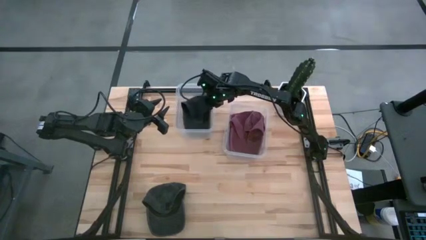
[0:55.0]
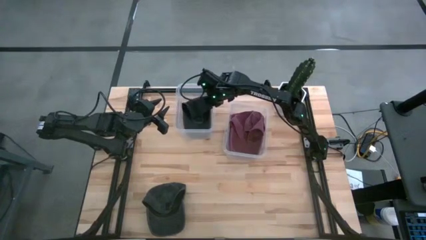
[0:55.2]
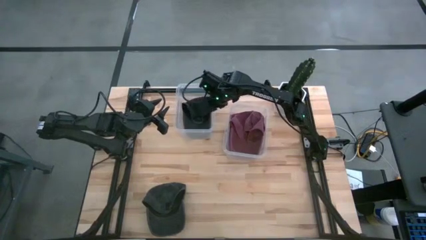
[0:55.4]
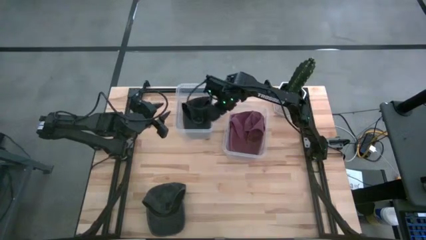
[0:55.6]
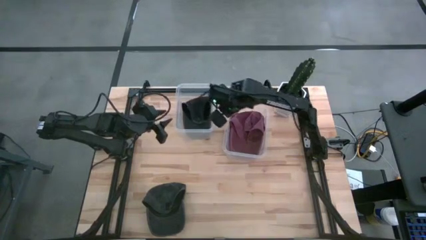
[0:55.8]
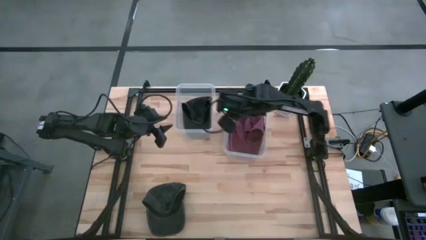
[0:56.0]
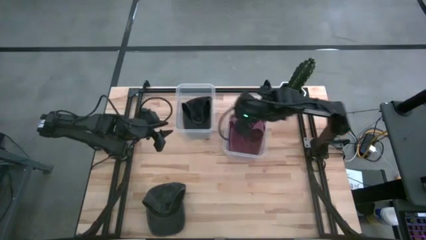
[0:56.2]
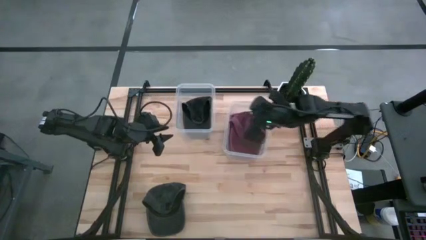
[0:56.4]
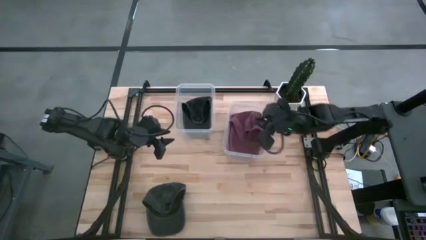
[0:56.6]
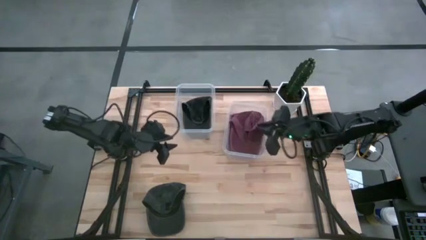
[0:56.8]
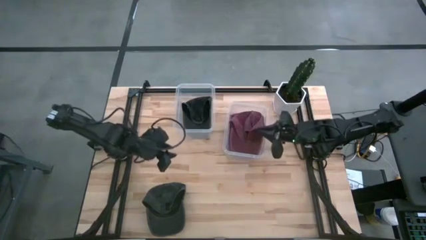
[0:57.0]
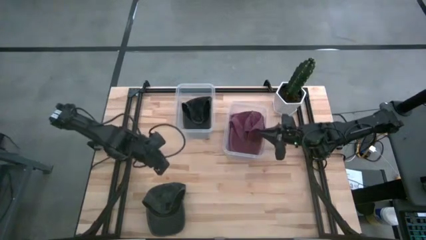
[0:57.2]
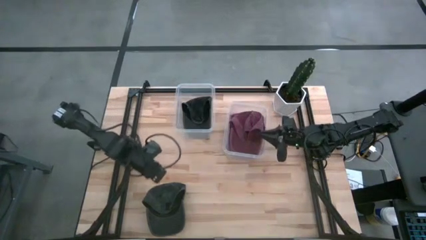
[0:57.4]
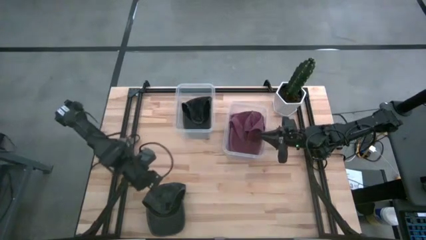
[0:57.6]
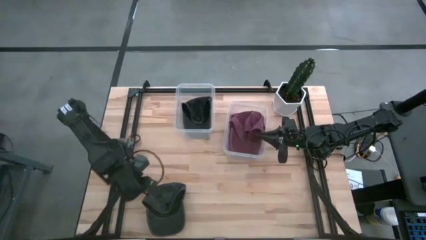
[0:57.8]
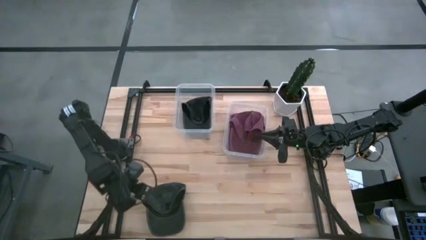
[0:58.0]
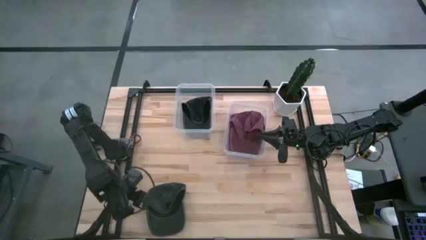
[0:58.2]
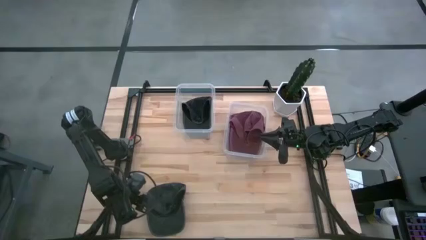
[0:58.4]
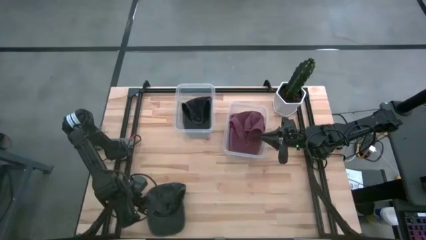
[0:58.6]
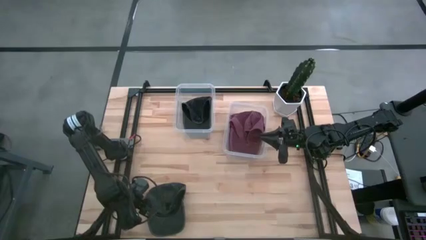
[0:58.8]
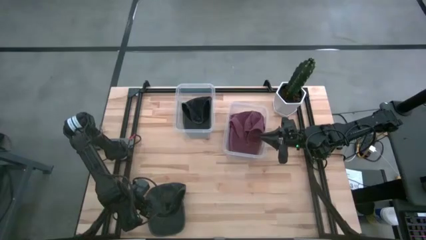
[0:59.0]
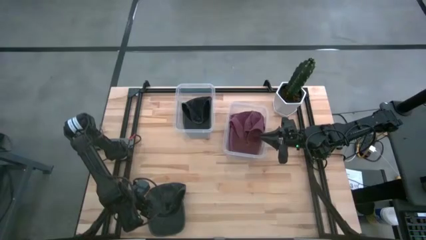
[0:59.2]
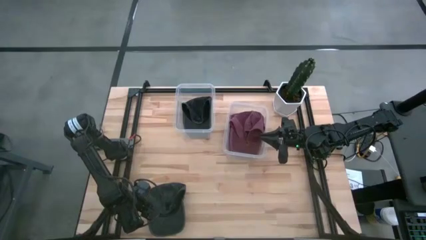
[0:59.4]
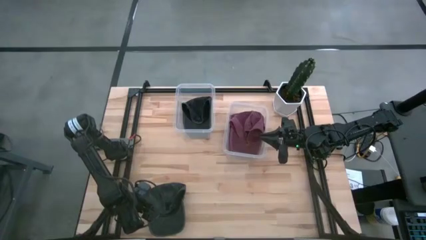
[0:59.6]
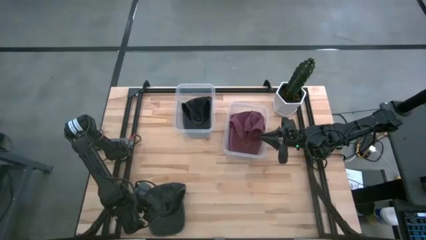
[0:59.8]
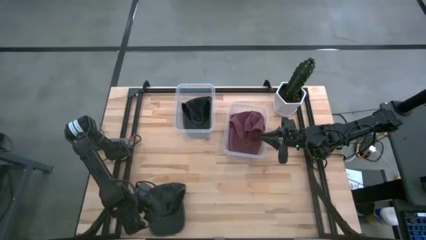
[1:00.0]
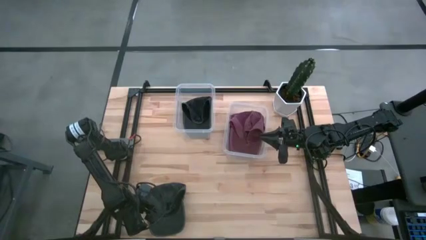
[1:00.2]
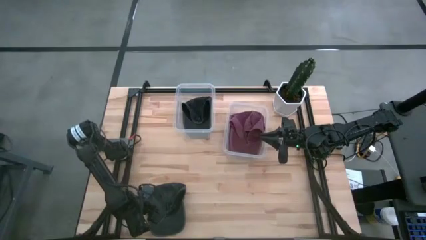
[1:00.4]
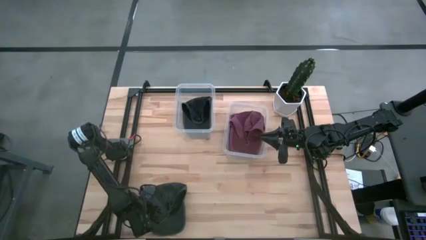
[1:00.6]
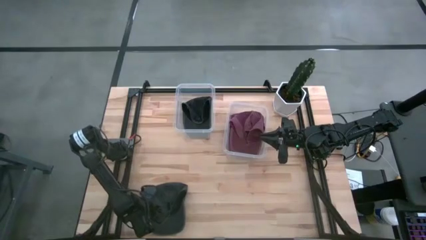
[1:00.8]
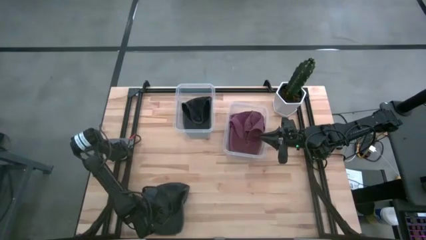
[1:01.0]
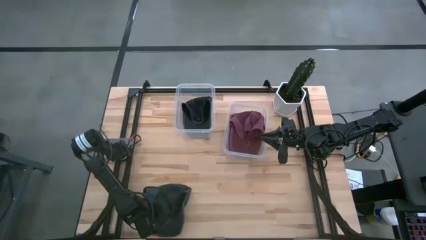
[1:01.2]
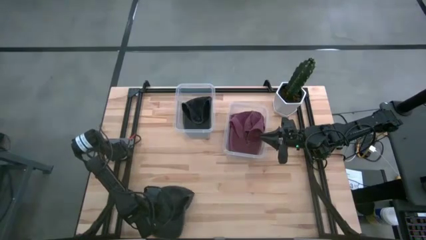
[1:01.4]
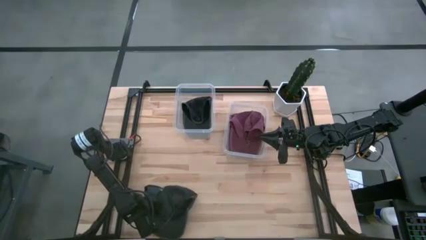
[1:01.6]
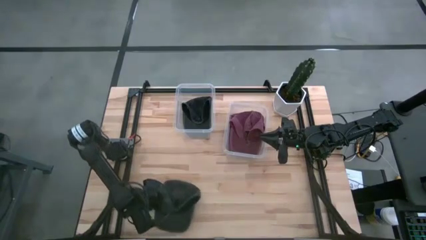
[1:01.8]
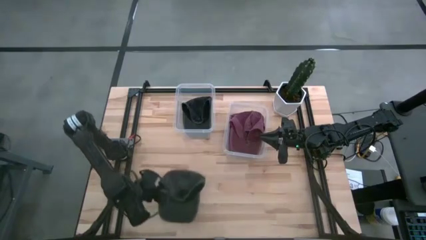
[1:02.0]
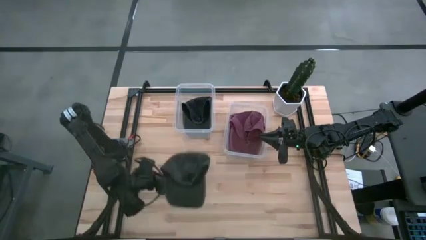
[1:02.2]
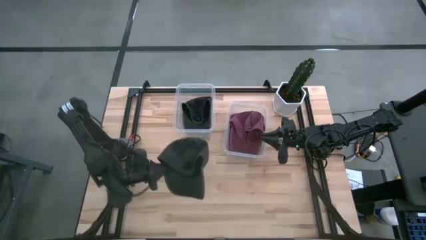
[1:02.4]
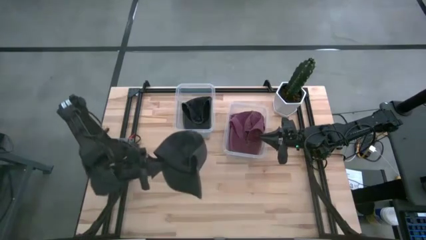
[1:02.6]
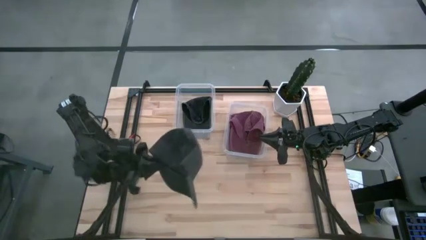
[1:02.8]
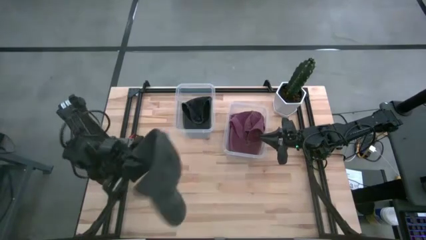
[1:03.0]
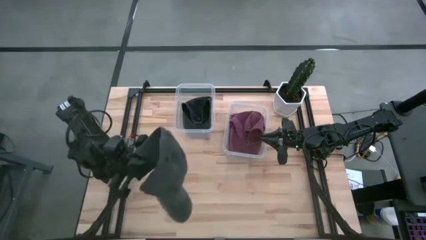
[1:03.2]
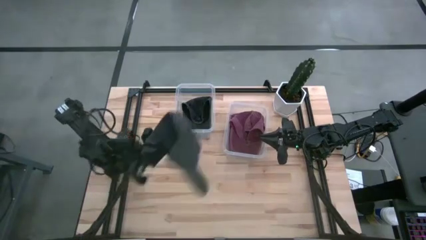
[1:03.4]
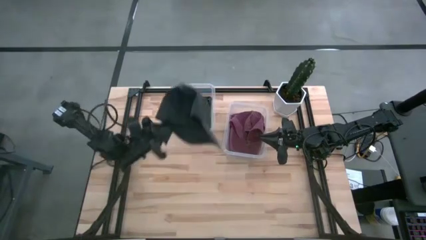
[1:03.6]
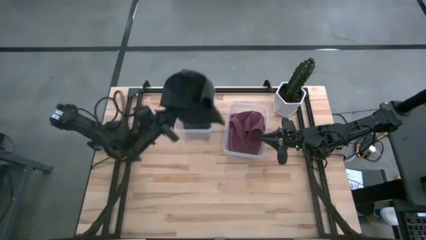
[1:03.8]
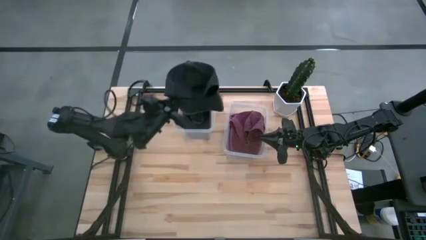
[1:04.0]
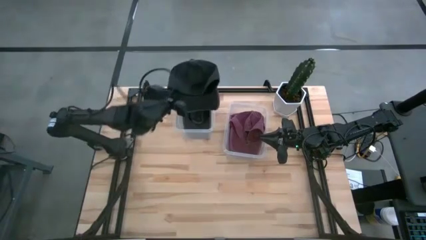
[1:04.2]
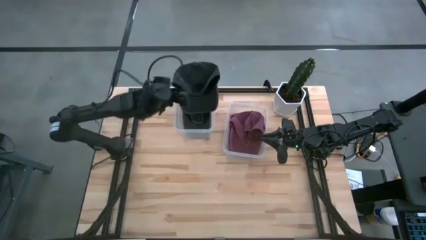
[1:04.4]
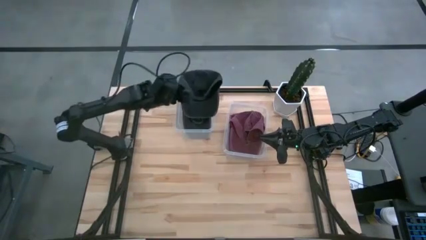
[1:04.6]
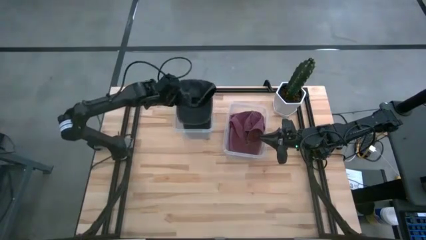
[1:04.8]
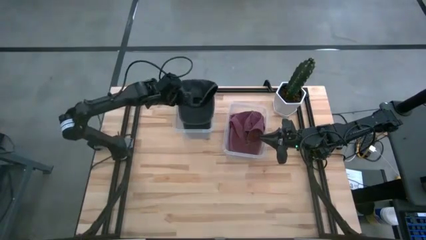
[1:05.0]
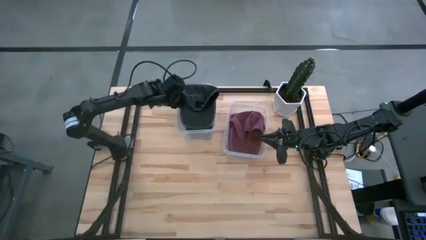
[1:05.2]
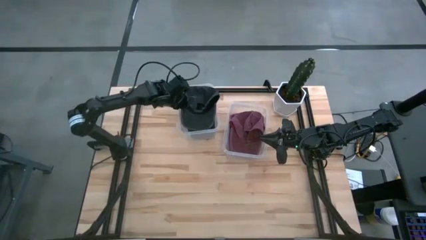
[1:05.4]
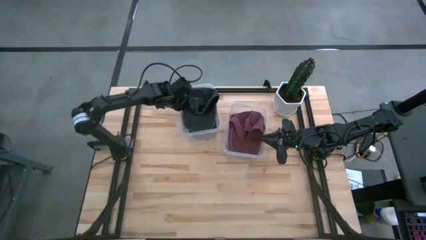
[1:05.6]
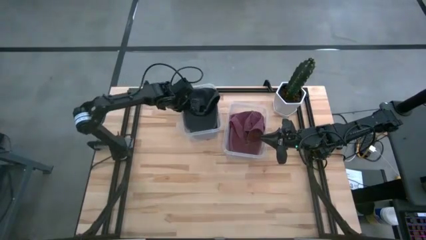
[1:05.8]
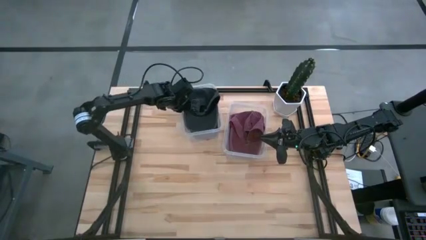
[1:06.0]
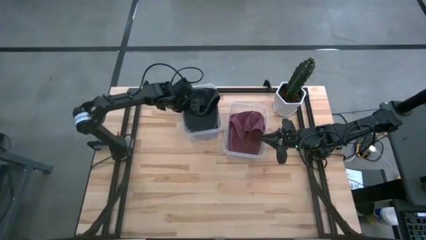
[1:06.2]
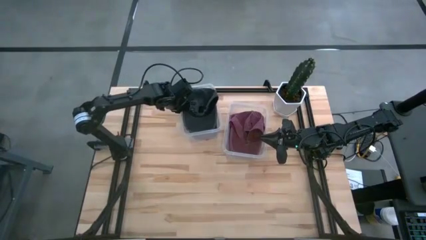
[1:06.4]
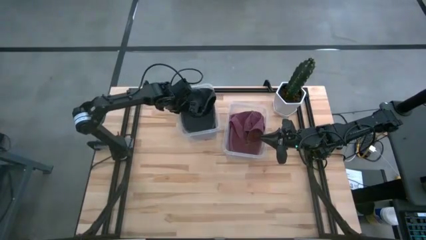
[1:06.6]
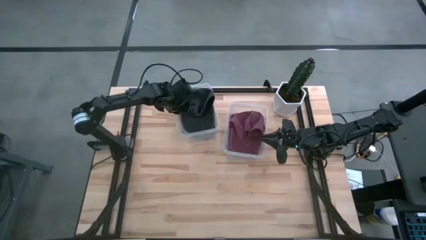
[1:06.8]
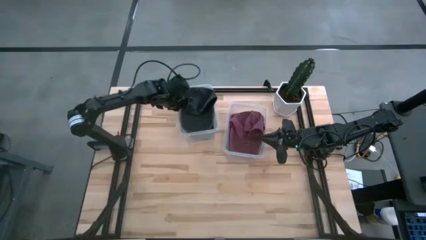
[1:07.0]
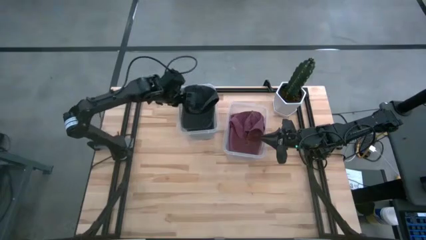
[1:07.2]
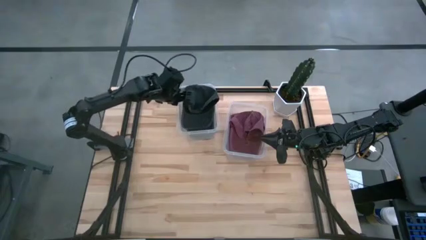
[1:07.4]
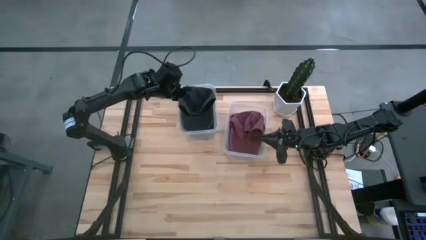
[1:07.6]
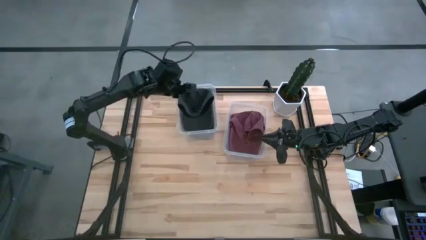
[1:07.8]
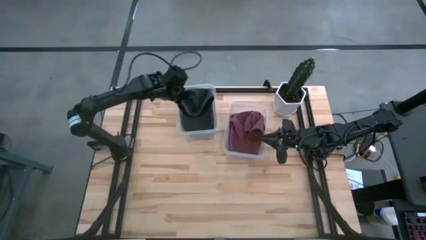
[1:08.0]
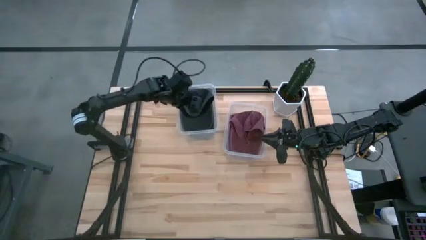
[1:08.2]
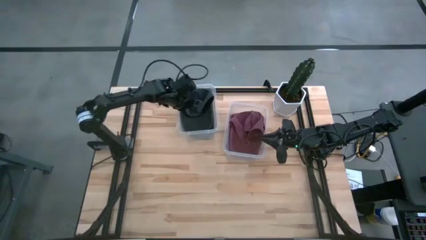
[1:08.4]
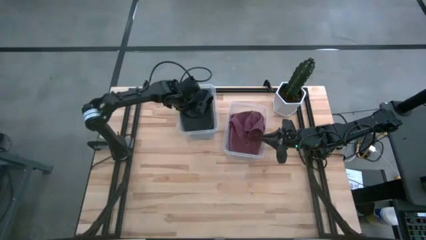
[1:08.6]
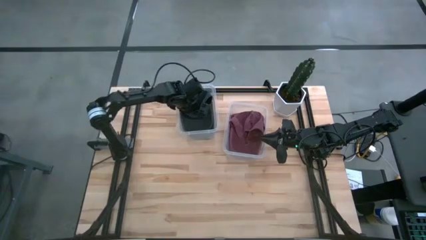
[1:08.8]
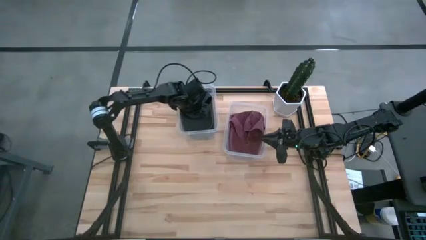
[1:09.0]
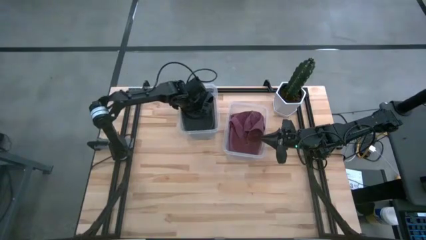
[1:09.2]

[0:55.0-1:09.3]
Task: Pick & Place hat
Put the black cap into the left transparent bin

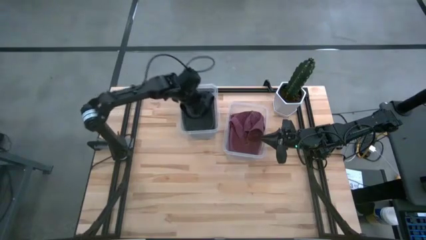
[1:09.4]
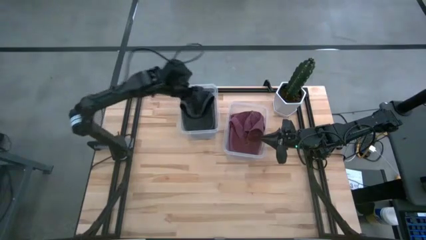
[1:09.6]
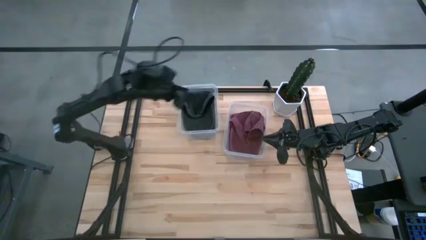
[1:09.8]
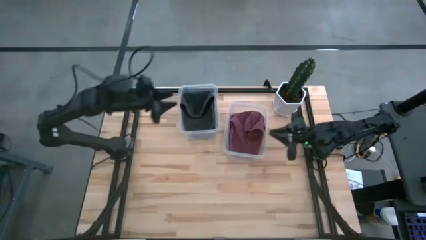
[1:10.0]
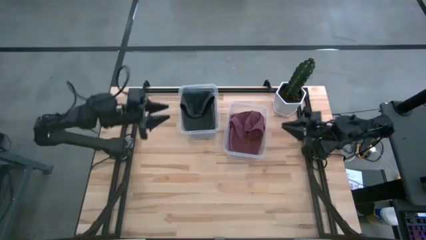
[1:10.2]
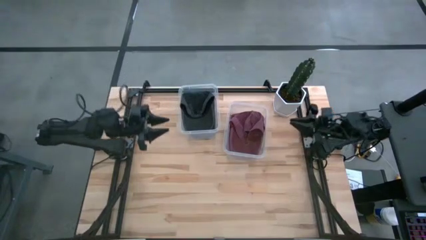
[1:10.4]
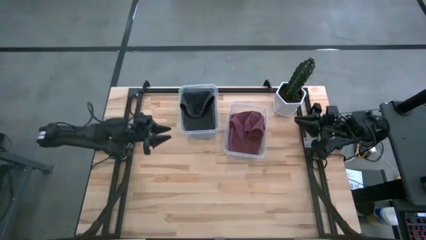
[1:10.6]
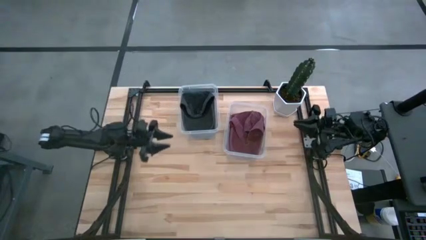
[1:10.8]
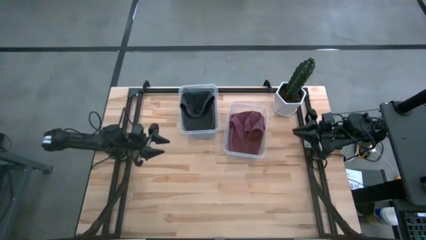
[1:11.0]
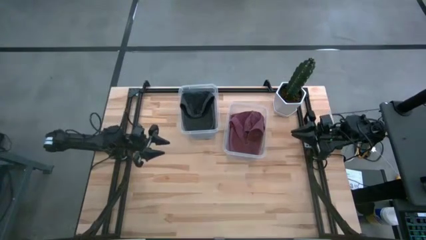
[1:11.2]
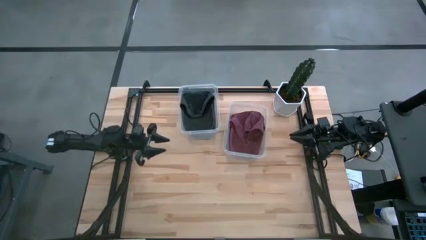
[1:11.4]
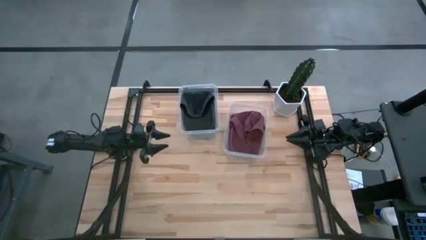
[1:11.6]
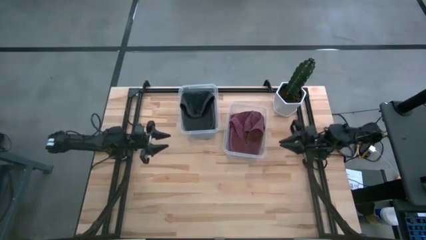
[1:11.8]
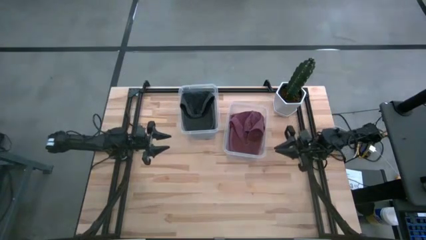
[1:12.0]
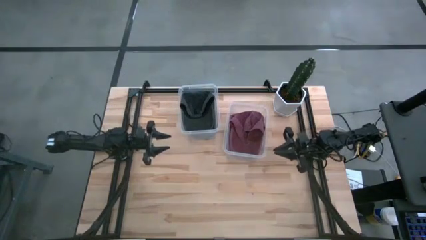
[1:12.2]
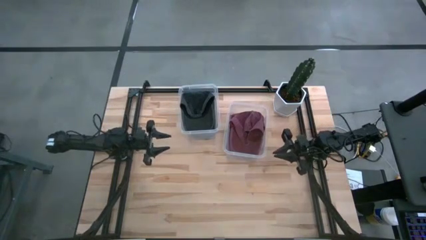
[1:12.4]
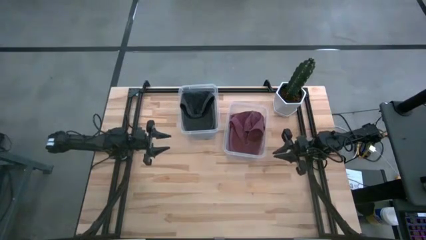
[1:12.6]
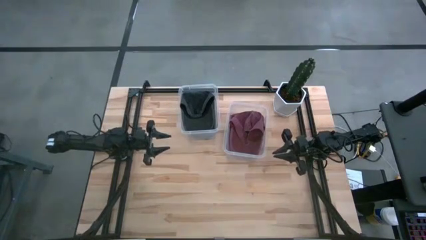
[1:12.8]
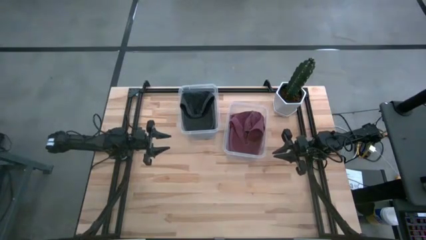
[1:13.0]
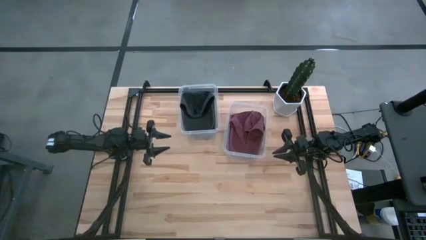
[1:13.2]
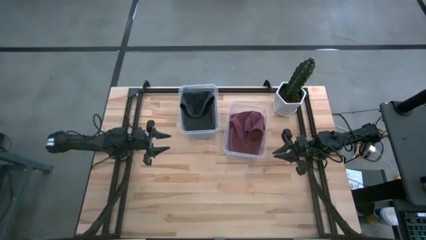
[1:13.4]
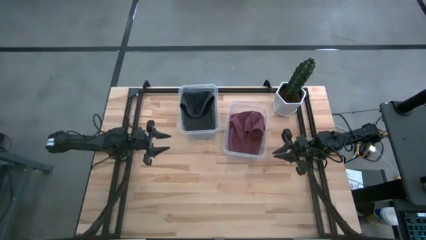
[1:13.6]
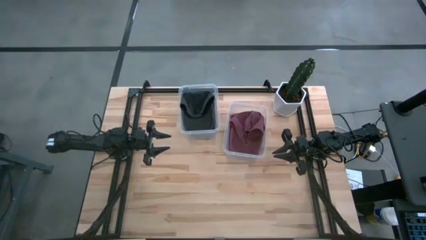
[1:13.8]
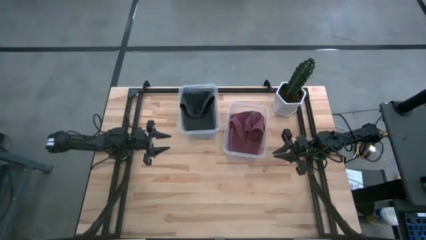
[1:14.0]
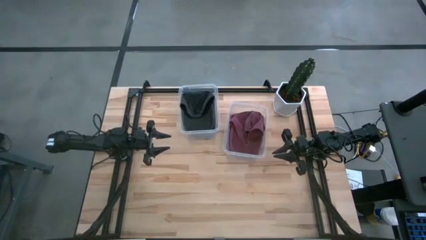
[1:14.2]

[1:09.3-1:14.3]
Return to Home Position
